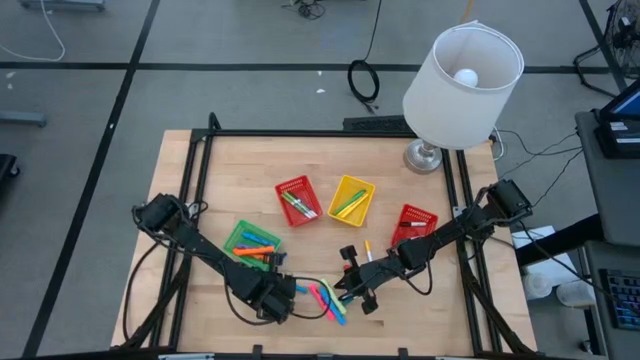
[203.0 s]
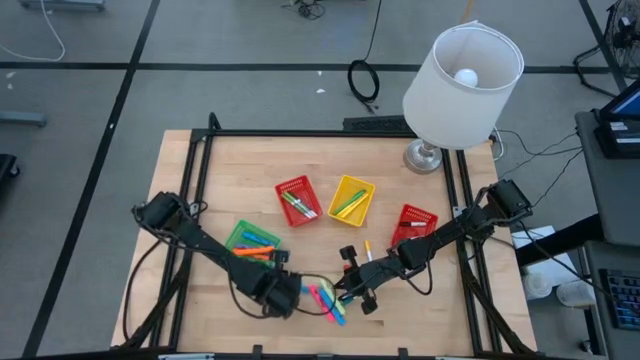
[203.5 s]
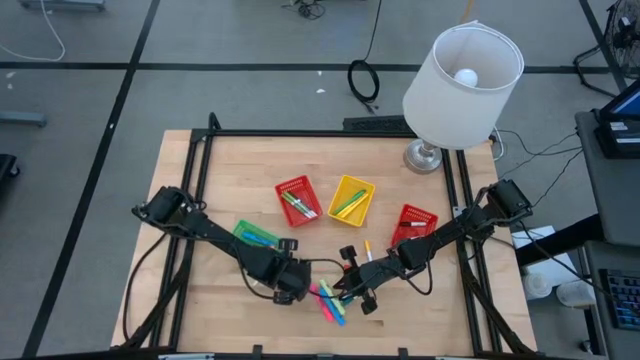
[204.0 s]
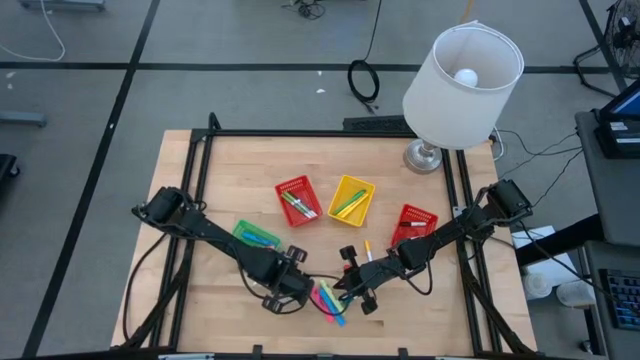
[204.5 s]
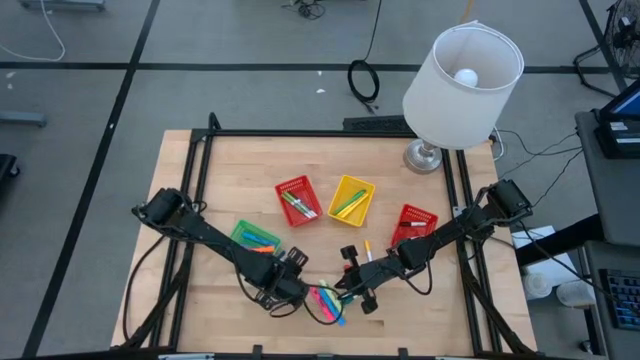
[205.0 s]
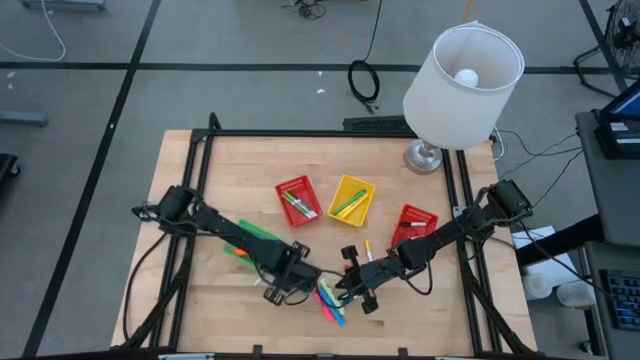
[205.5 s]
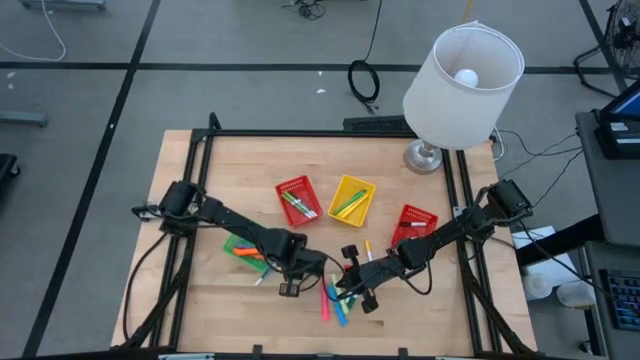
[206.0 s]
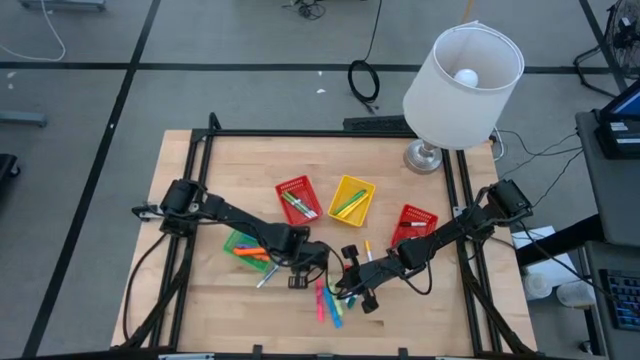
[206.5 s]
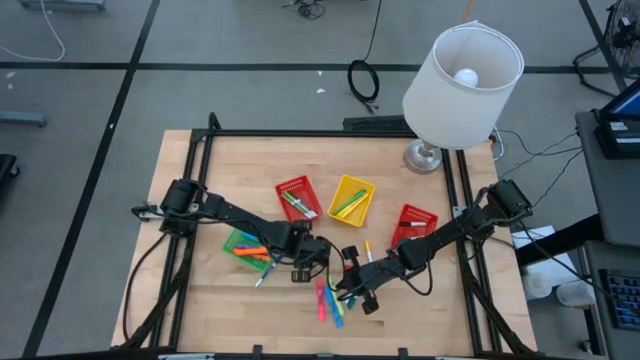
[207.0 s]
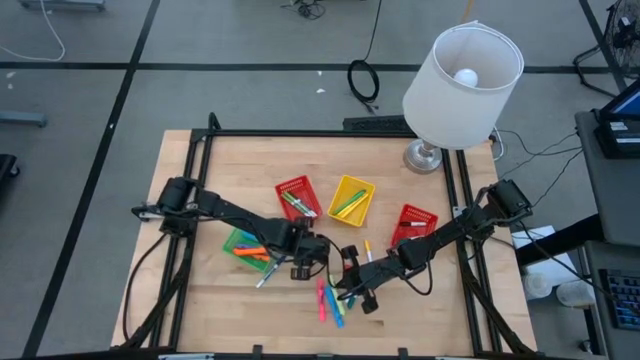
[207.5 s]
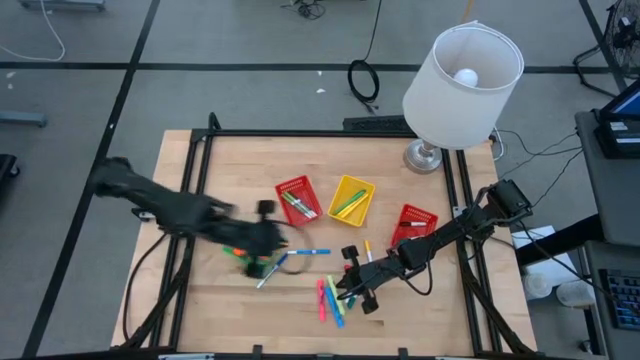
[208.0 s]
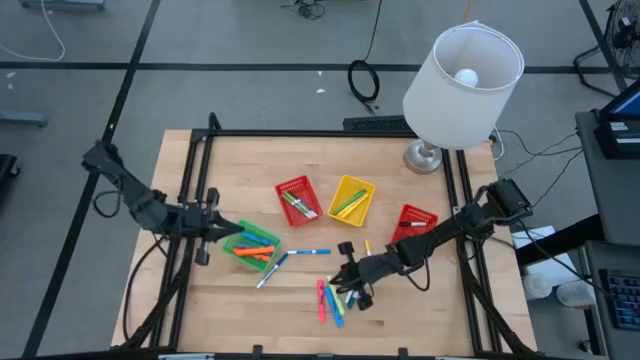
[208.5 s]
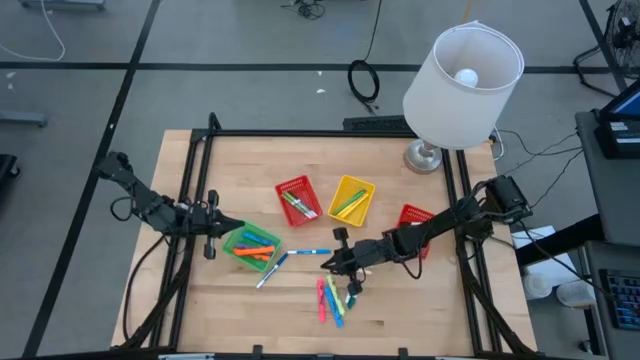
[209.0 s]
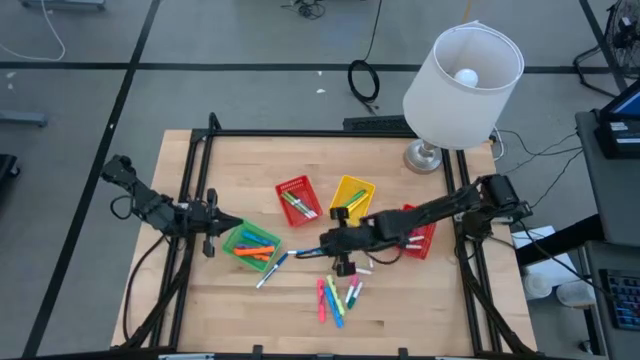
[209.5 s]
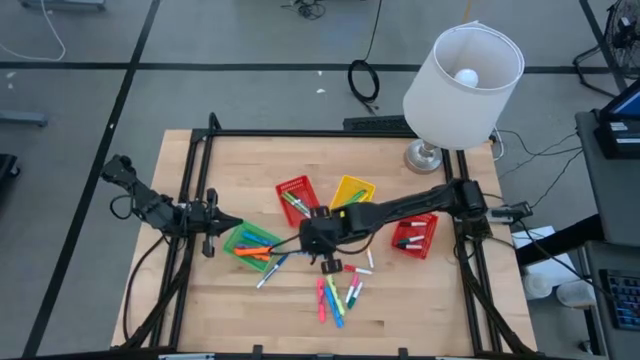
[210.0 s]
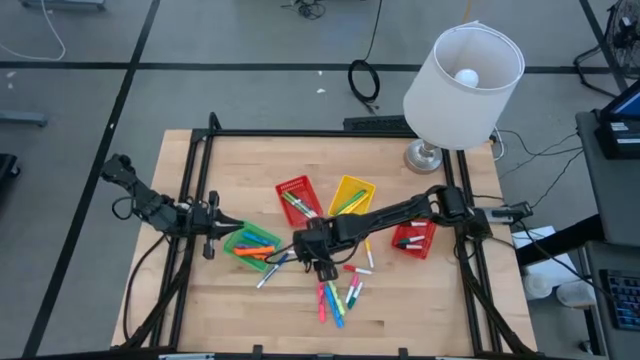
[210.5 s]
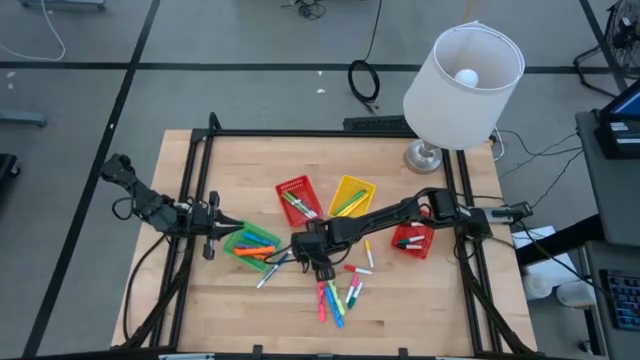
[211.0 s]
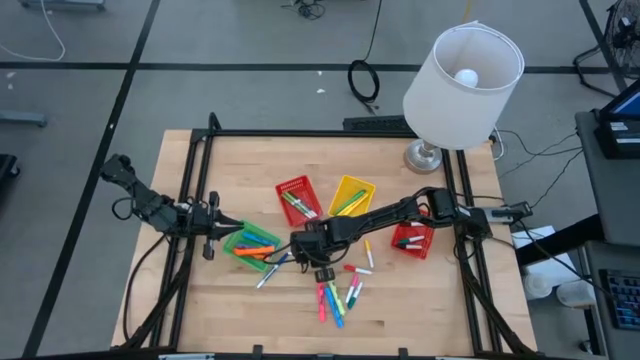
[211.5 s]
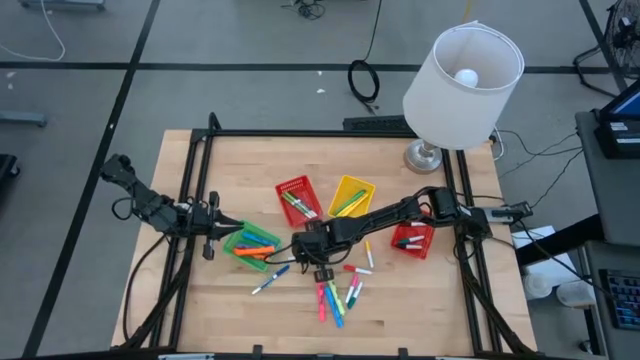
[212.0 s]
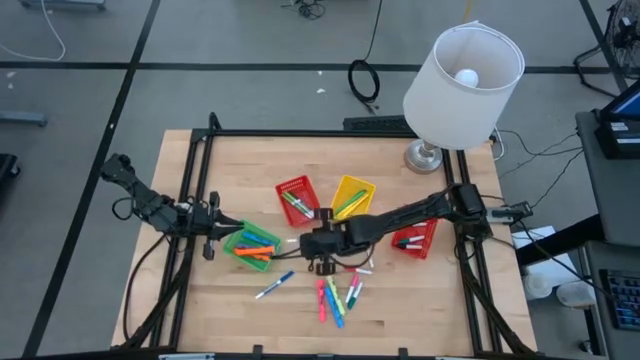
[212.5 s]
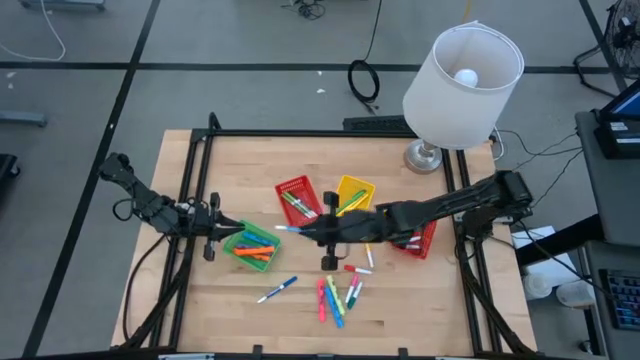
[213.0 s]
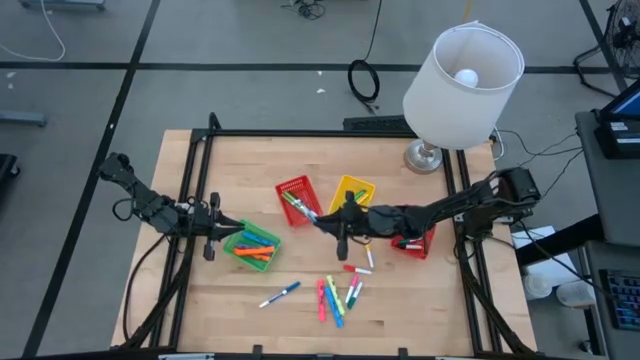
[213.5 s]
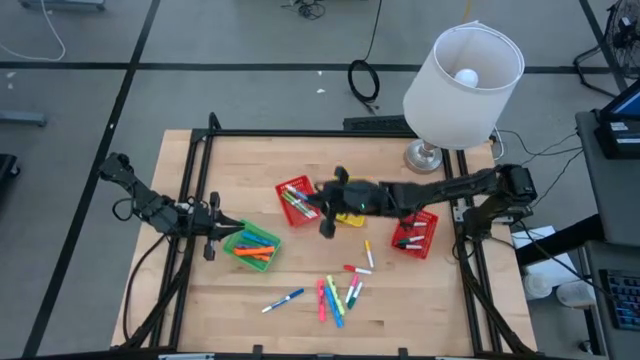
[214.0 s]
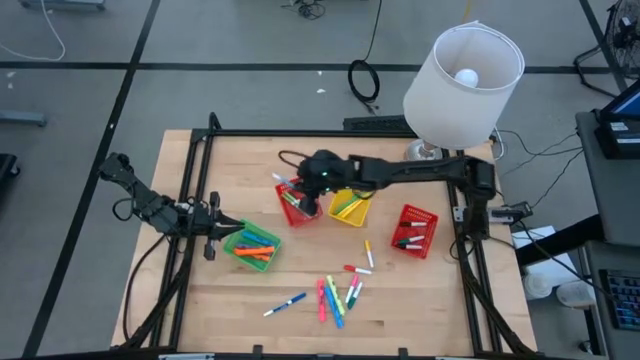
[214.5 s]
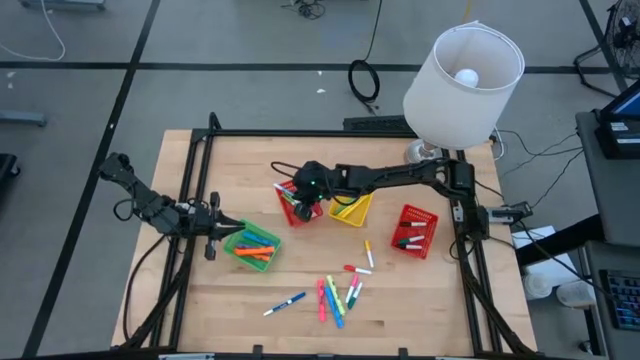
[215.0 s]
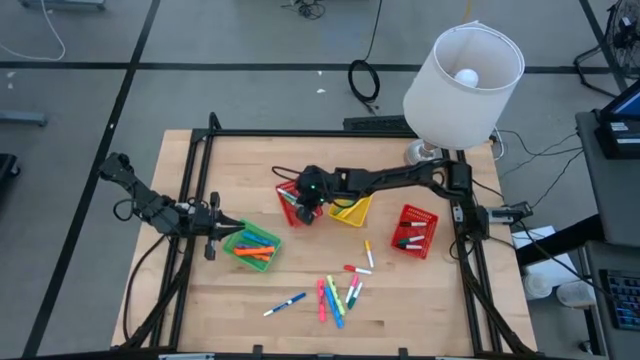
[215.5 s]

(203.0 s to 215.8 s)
Task: Pick & Place Markers
Put the light blue marker into the left red bin

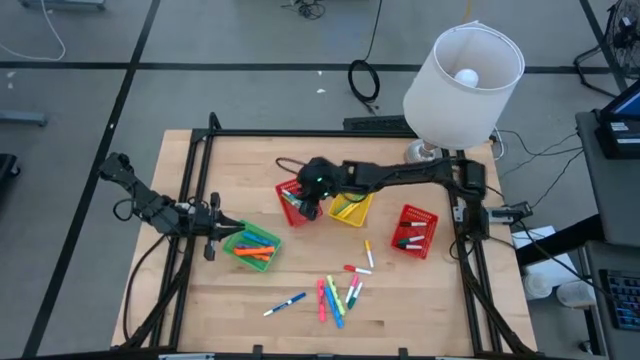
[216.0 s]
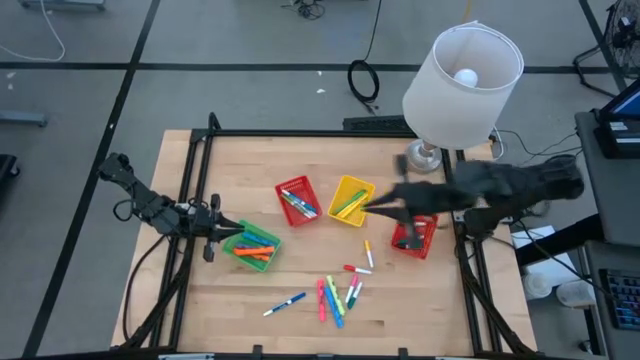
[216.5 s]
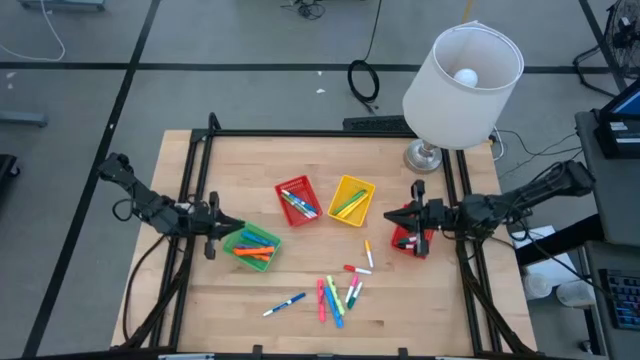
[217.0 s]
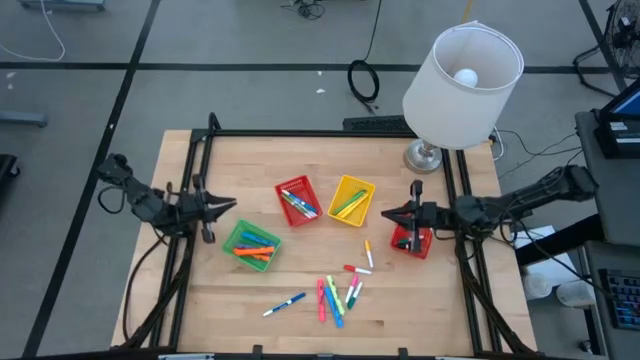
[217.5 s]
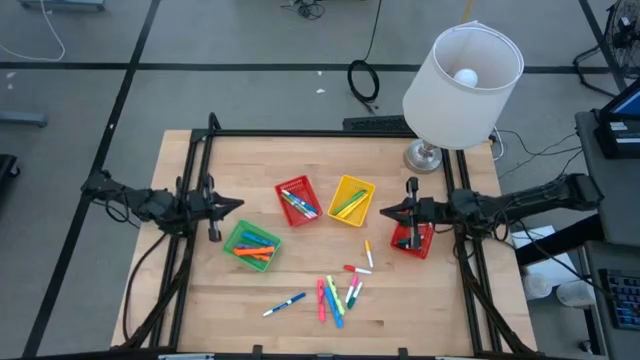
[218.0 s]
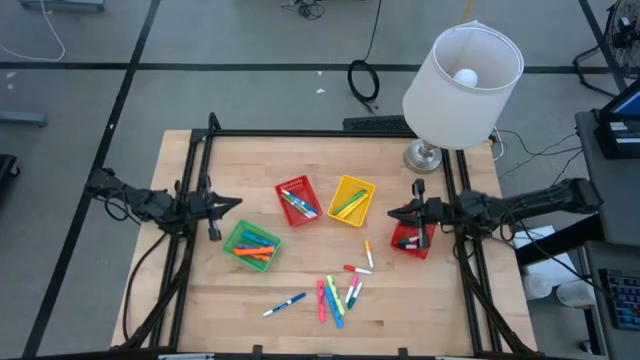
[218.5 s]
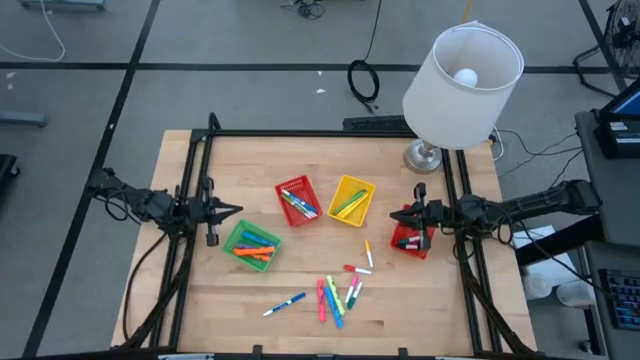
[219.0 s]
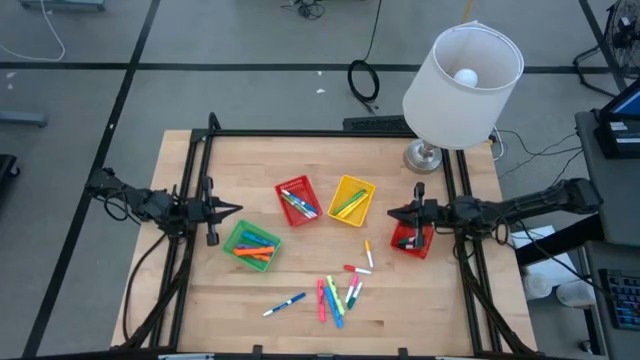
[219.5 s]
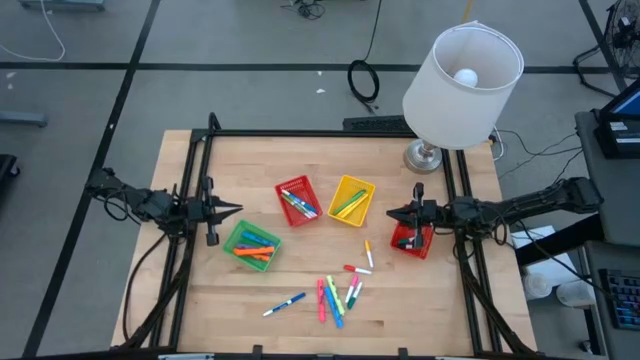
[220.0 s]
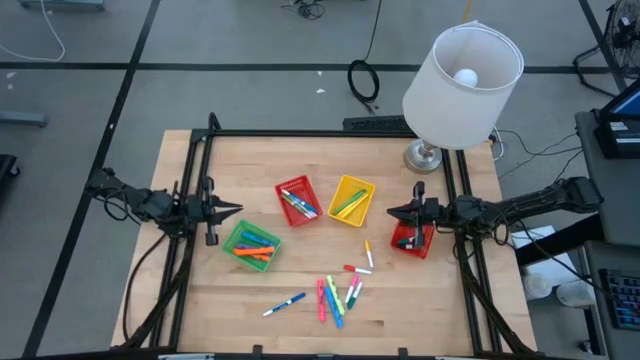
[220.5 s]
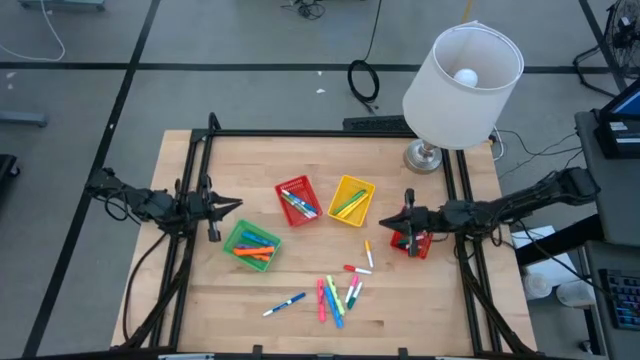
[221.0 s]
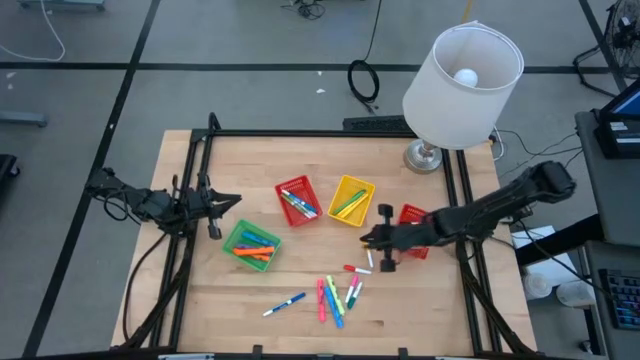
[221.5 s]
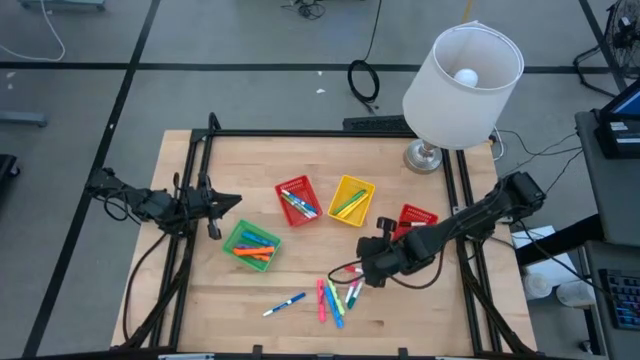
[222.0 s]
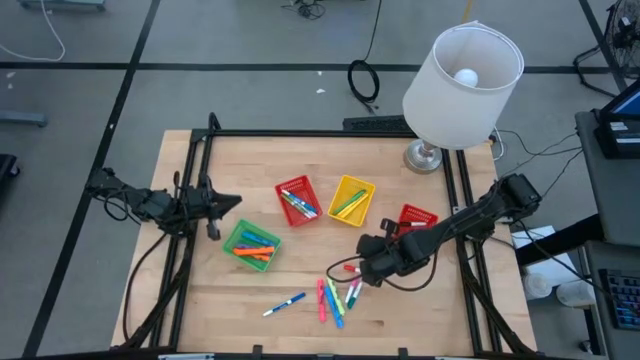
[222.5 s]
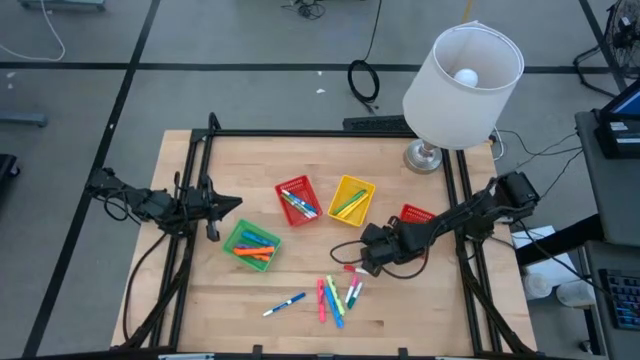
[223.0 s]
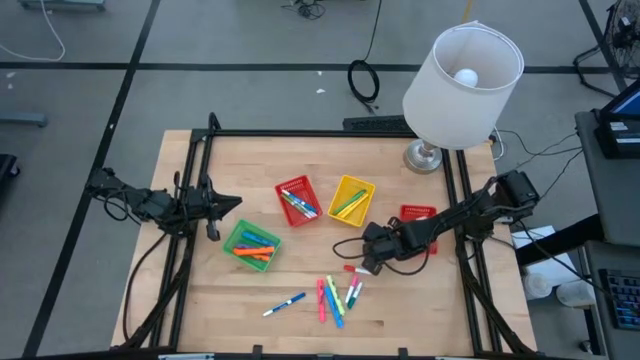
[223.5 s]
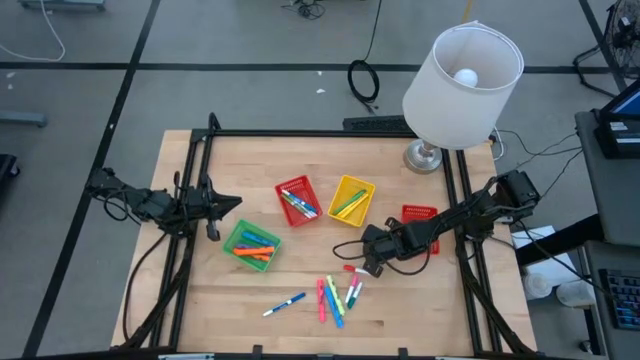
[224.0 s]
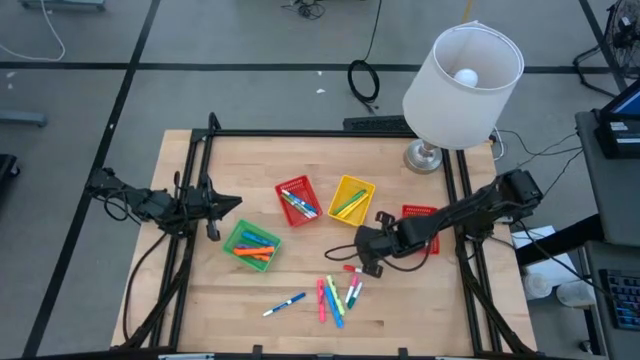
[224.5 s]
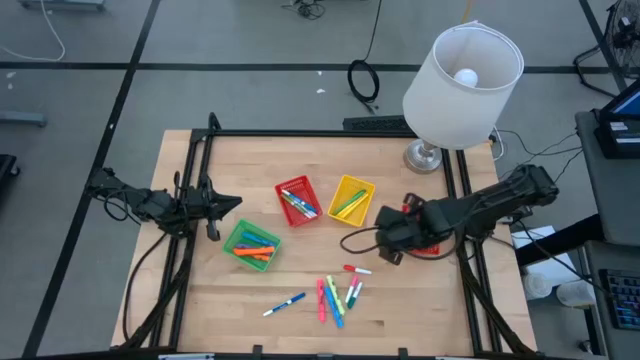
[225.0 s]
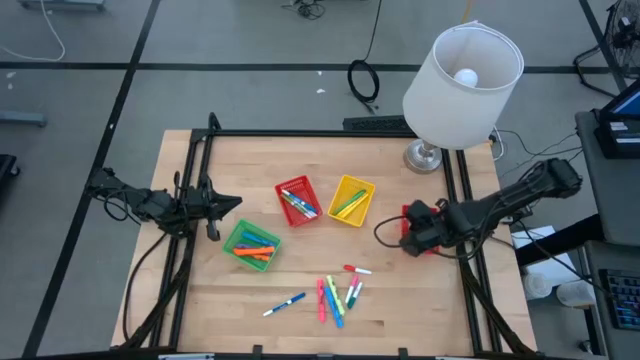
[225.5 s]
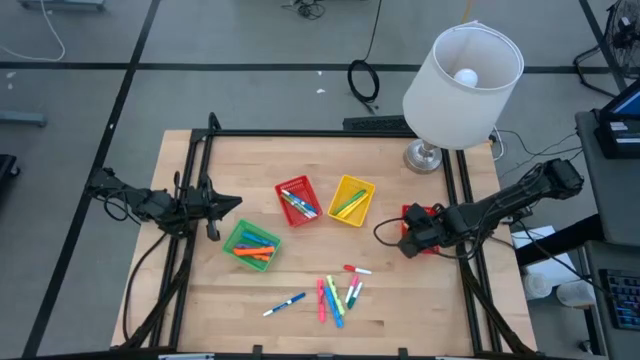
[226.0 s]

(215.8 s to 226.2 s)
Put the yellow marker into the right red bin
